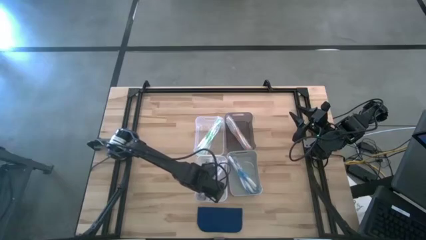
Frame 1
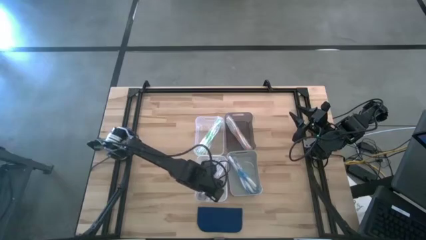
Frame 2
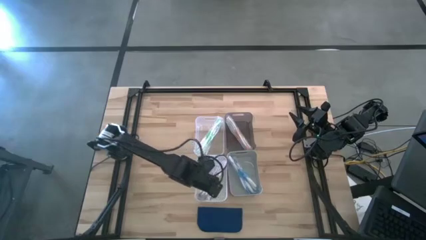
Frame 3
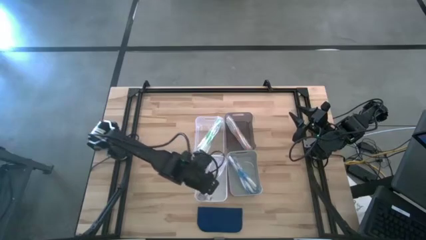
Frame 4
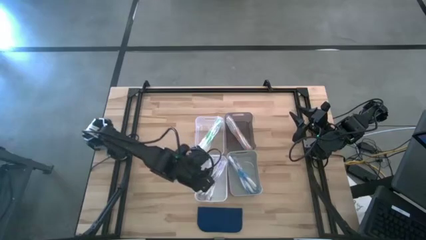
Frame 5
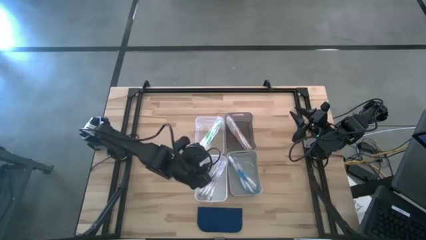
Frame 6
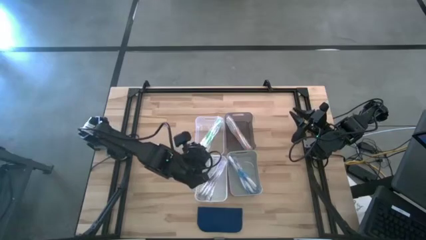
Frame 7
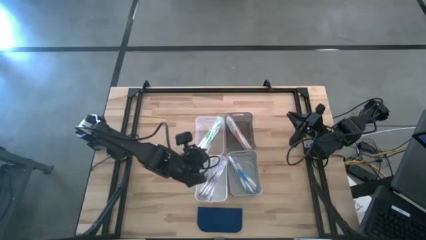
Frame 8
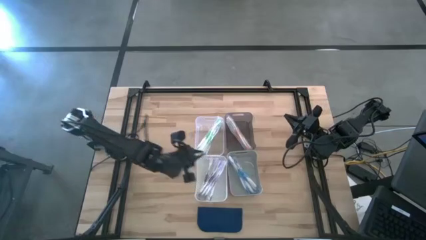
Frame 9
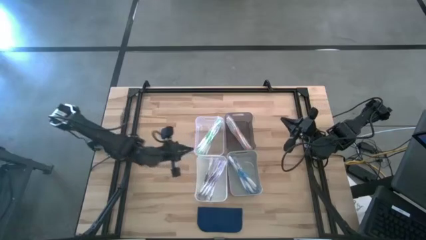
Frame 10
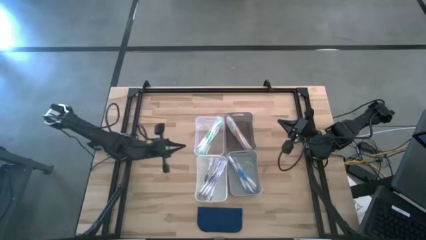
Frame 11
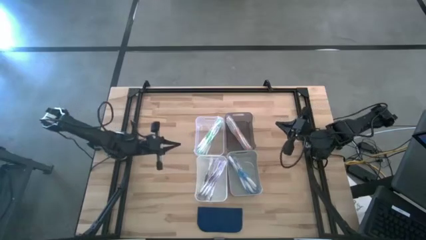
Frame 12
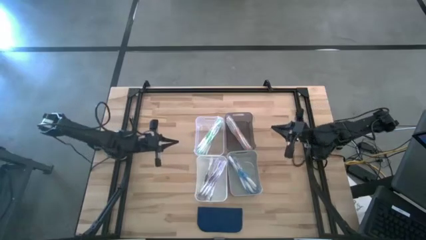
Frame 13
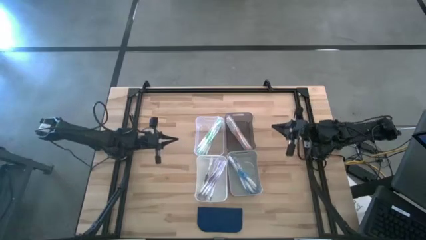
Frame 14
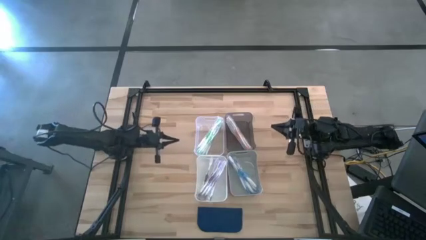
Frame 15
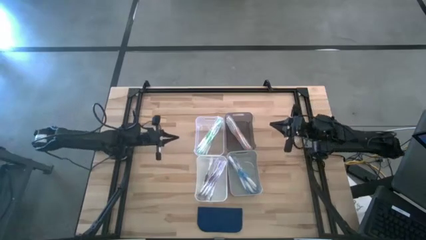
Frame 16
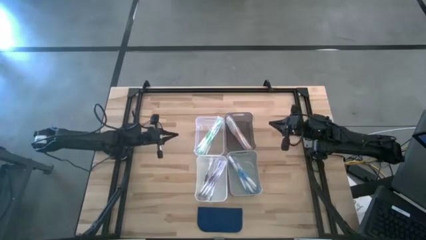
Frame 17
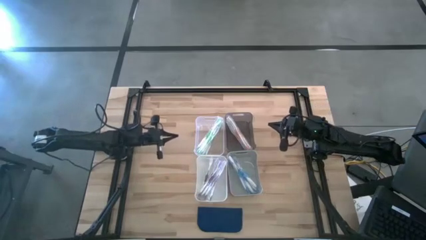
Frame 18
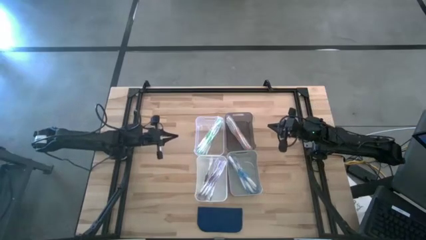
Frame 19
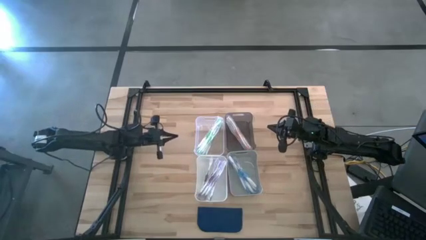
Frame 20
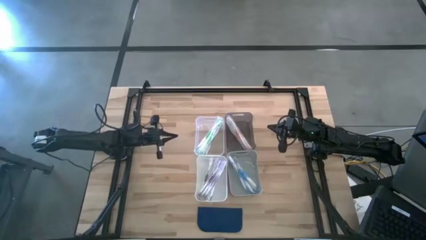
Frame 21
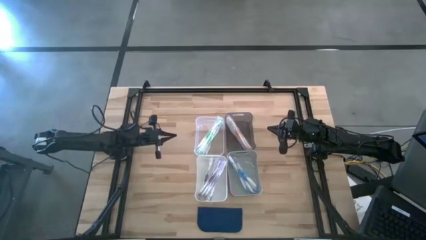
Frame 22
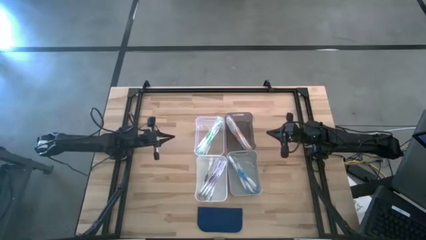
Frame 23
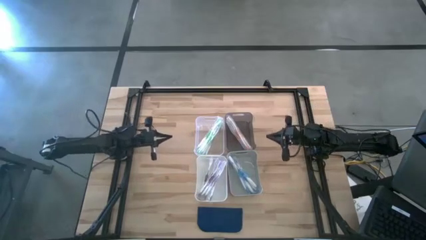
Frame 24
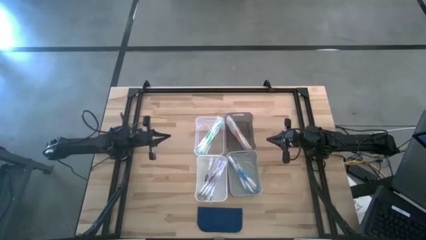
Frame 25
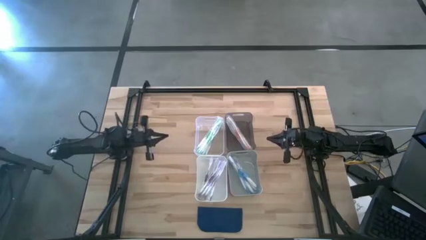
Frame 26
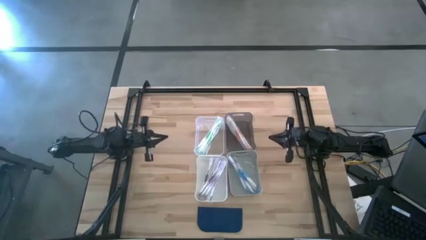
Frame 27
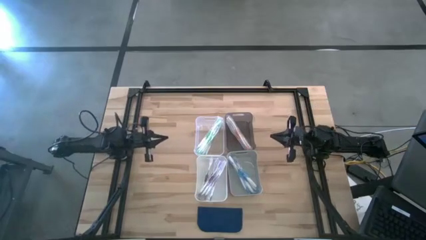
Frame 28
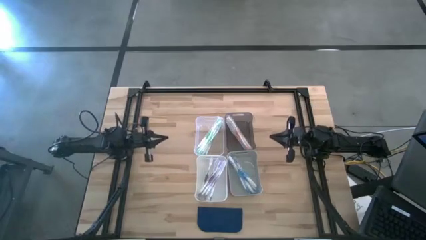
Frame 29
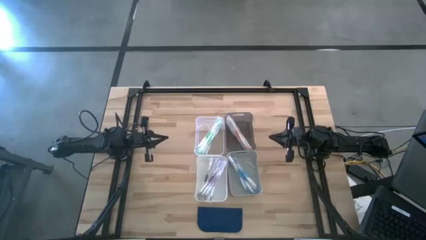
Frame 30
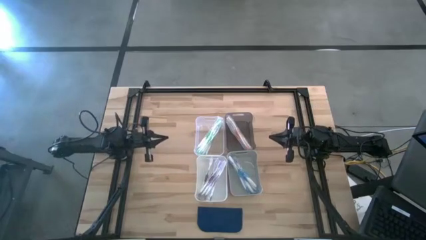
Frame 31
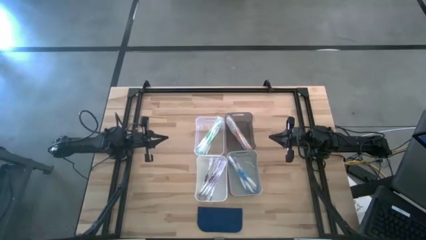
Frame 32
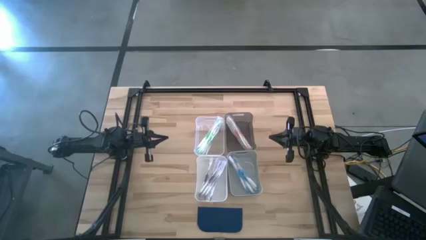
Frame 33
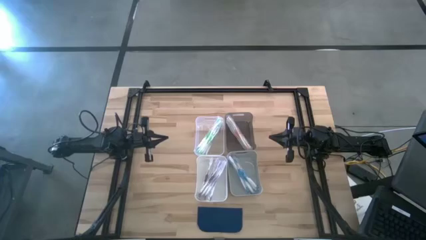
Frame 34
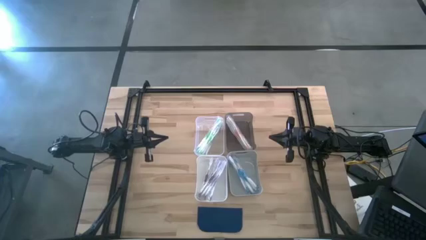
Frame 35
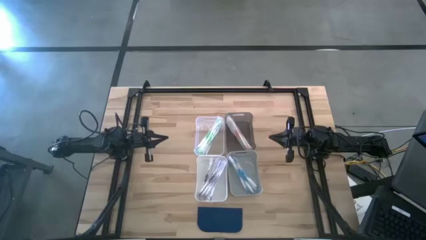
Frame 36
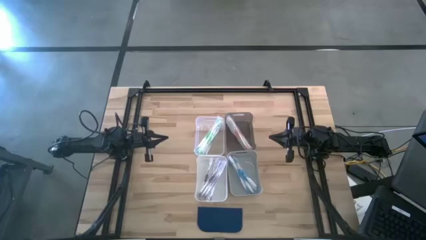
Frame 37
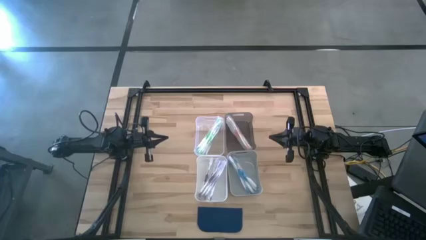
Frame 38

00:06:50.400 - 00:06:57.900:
Task: Pick & Place Toothbrushes
Return to Home Position

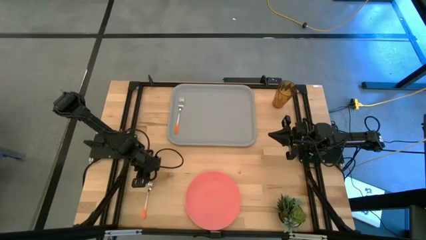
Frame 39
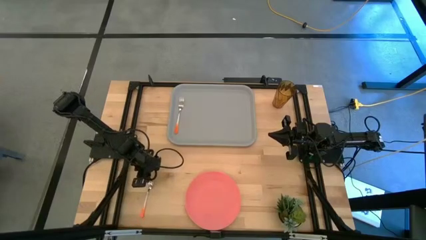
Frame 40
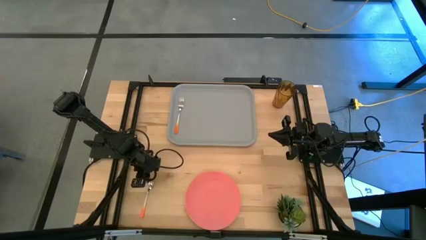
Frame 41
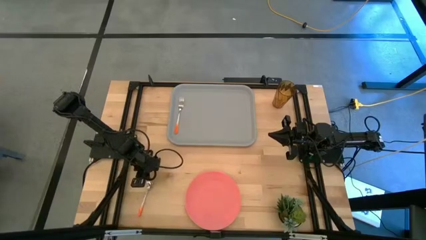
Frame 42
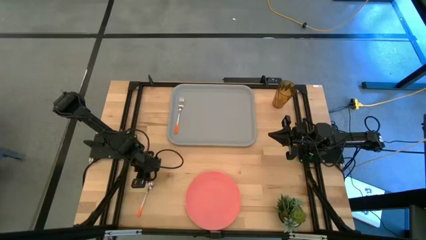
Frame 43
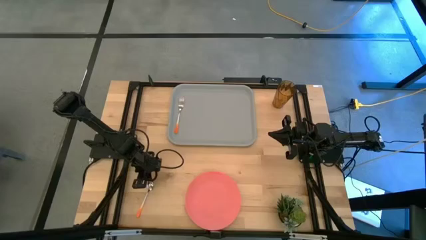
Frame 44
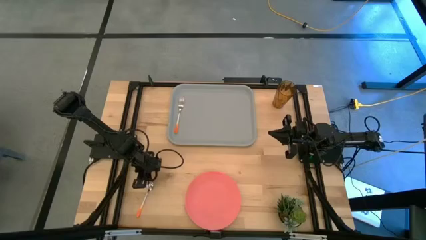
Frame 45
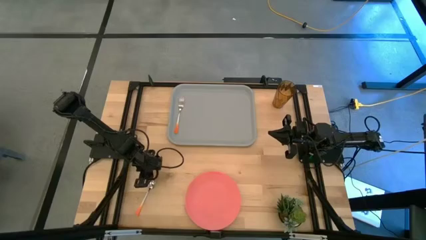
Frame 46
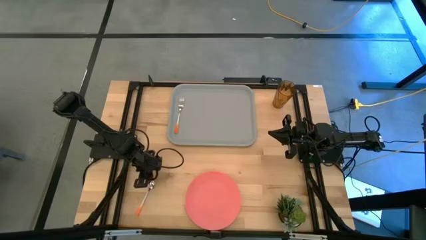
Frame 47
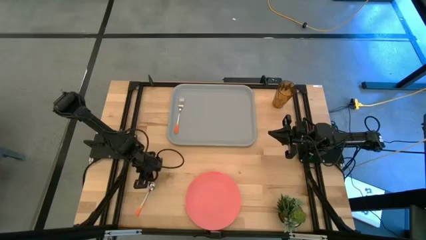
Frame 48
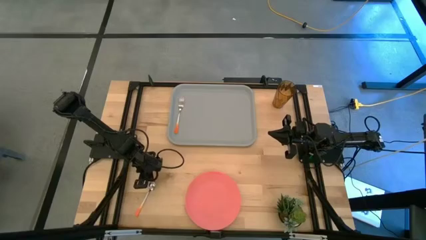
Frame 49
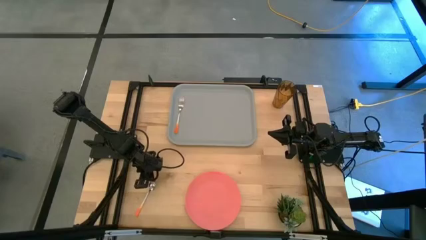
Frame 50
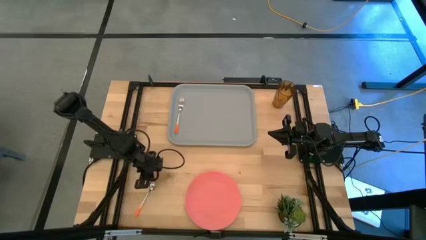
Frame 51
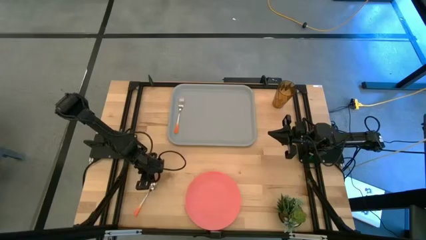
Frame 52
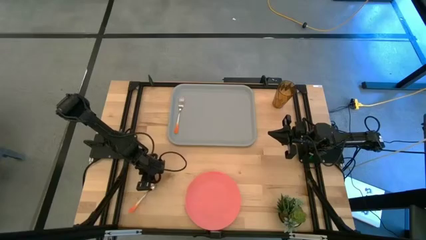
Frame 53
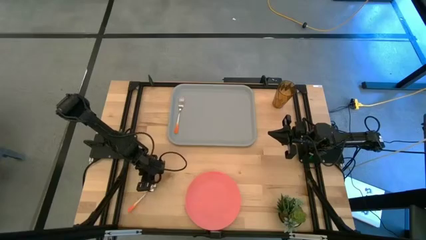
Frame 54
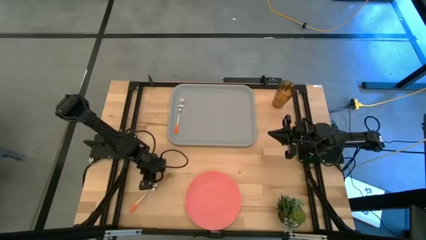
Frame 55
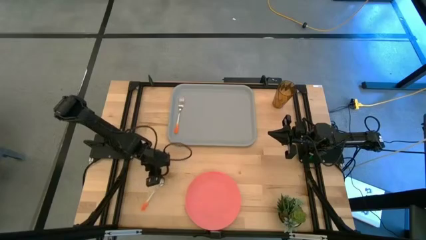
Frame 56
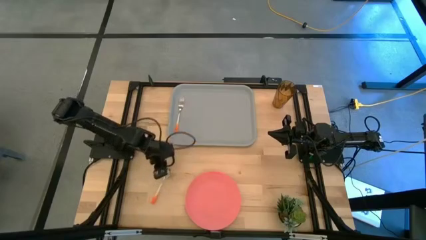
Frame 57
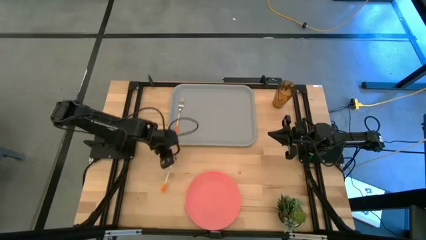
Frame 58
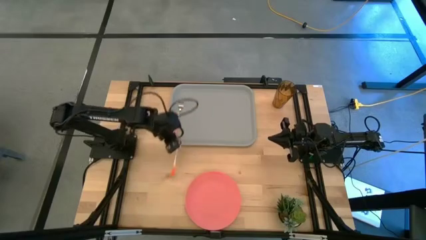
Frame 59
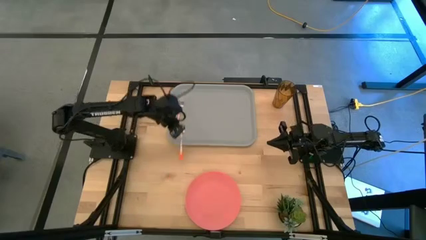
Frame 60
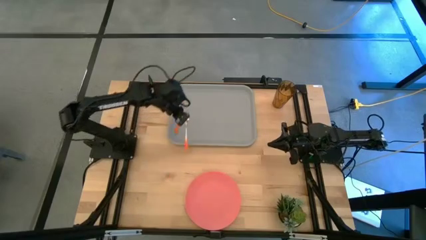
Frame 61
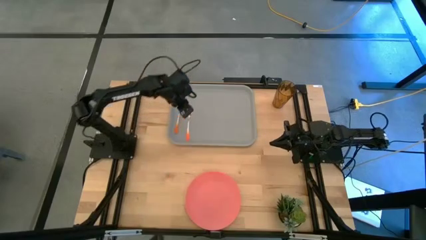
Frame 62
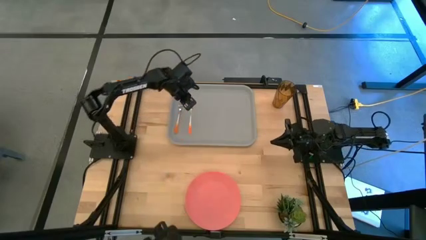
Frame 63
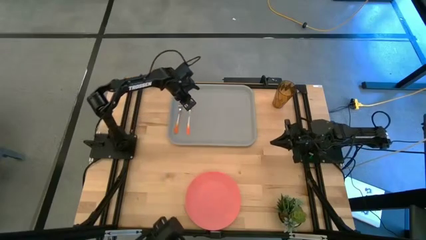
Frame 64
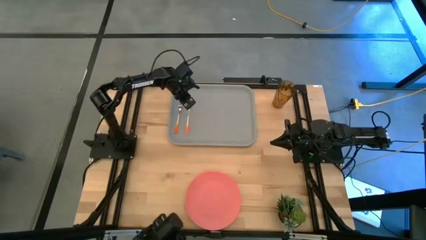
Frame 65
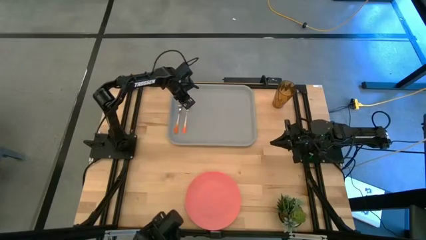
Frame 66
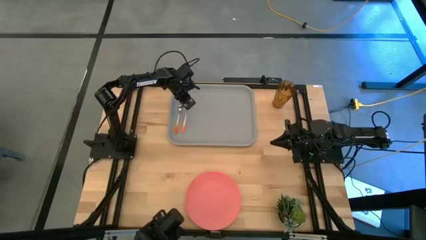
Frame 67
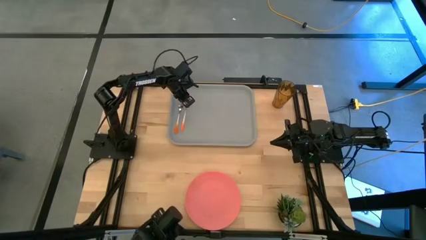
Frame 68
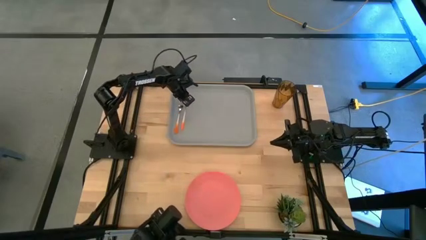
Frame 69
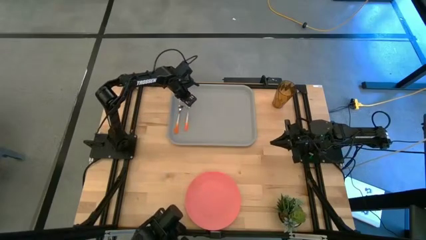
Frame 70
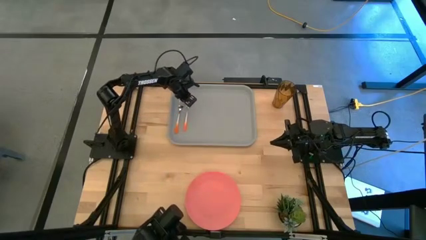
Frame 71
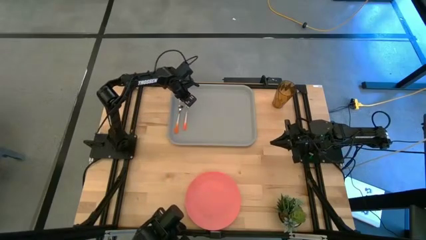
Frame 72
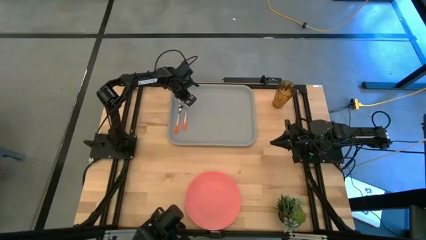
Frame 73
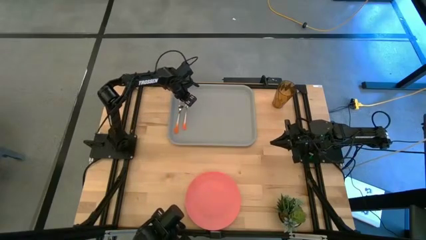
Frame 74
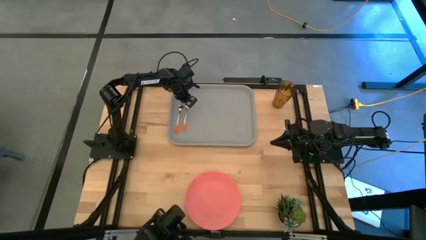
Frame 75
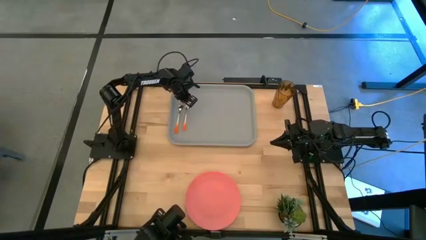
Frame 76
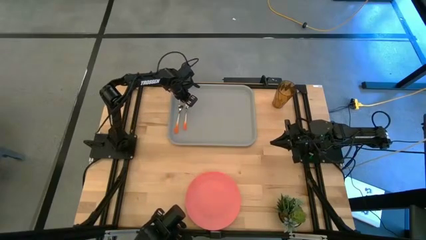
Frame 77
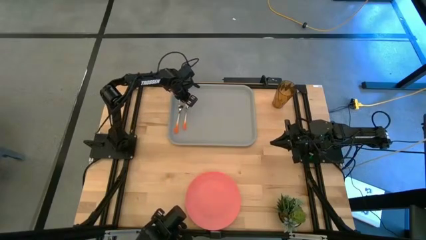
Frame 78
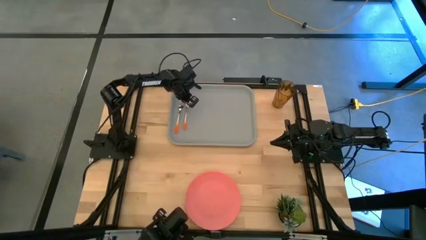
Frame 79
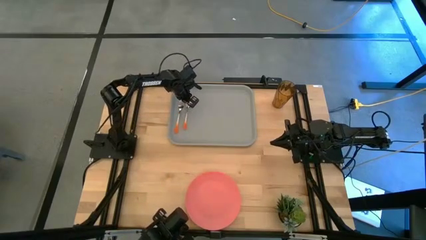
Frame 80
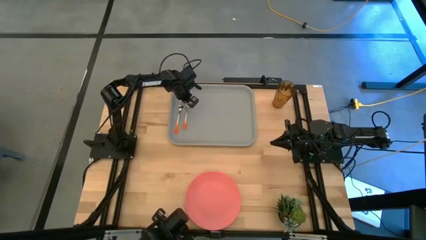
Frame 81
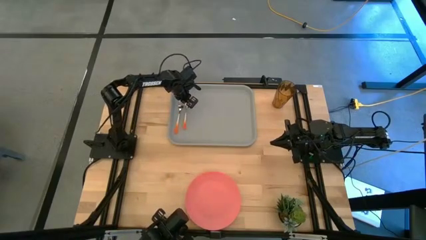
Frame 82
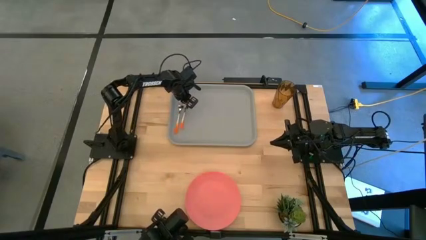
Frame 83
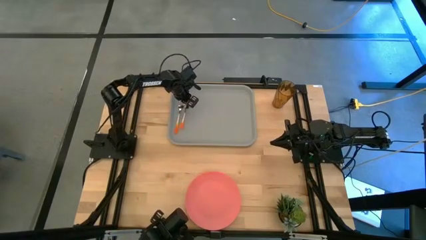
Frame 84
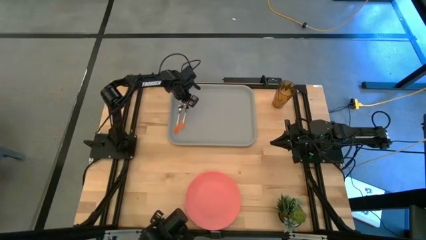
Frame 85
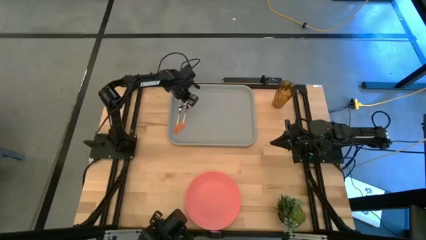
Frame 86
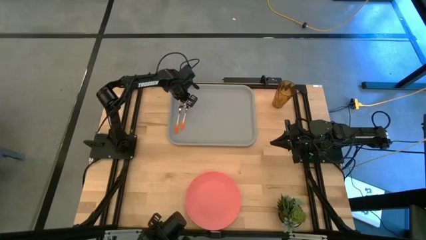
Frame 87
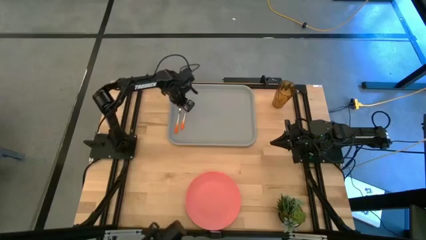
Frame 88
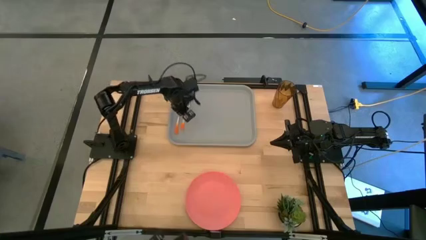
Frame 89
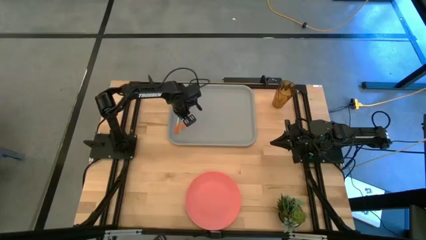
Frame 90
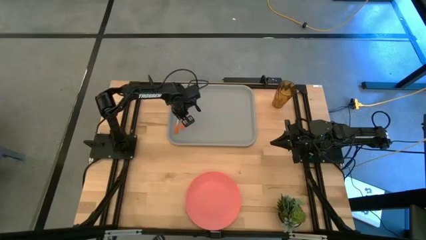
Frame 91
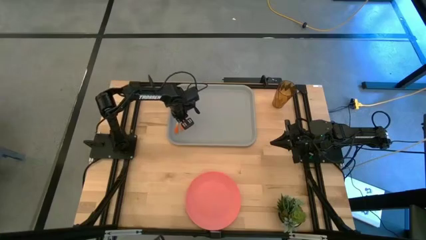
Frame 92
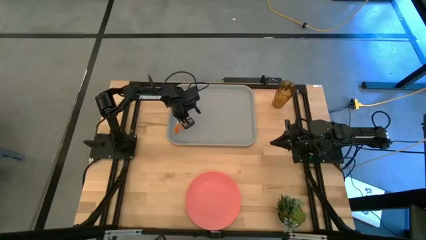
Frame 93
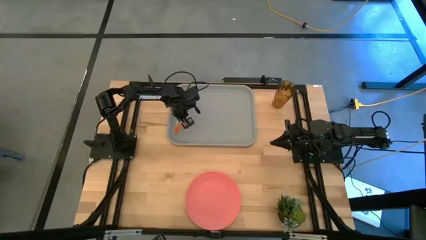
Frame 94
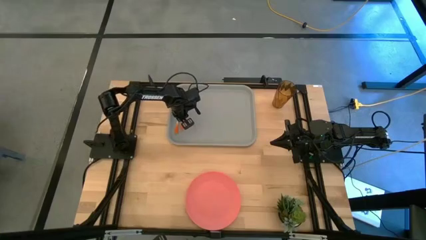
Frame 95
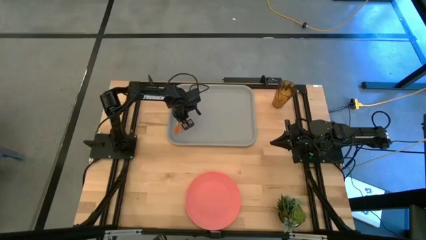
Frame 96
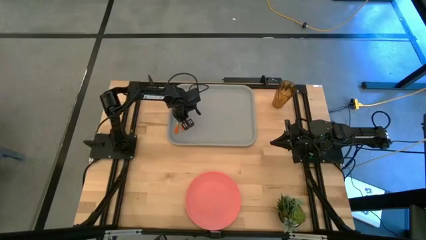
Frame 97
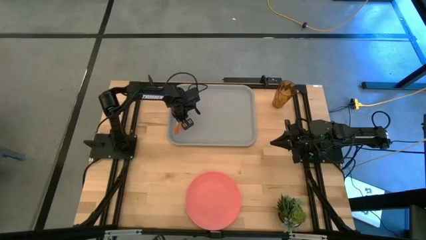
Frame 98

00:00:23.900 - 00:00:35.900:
Task: Pick and place plate/cup/fork/spoon on tray
Put the orange spoon on the gray tray to the right side of the orange fork
